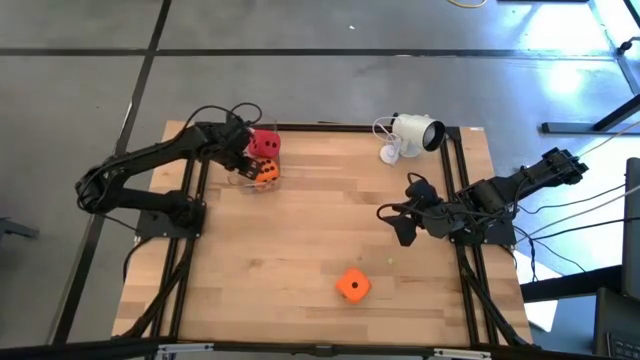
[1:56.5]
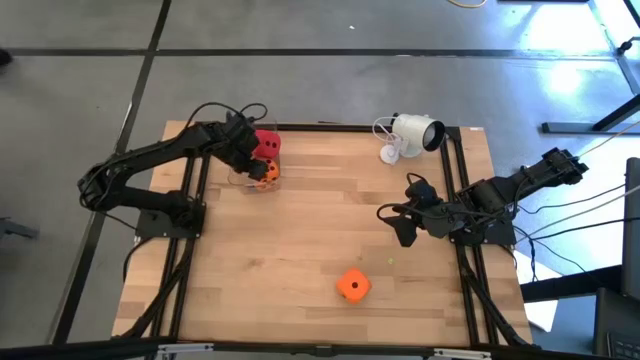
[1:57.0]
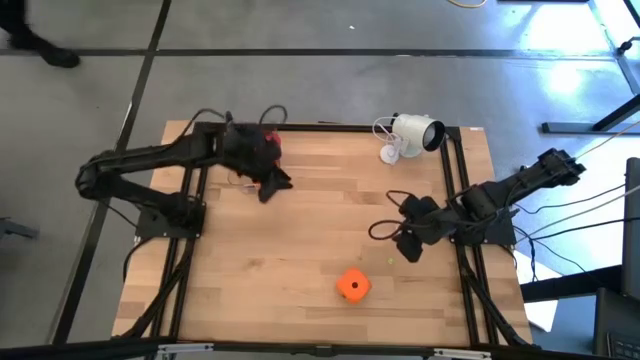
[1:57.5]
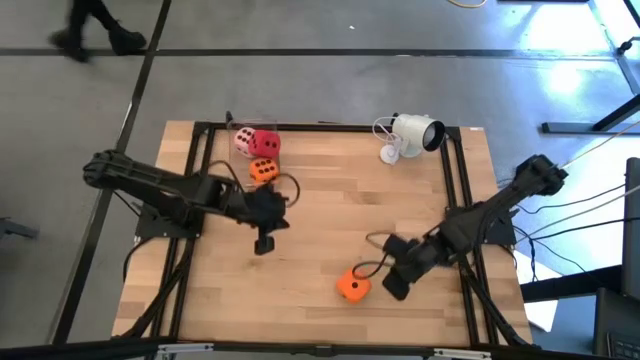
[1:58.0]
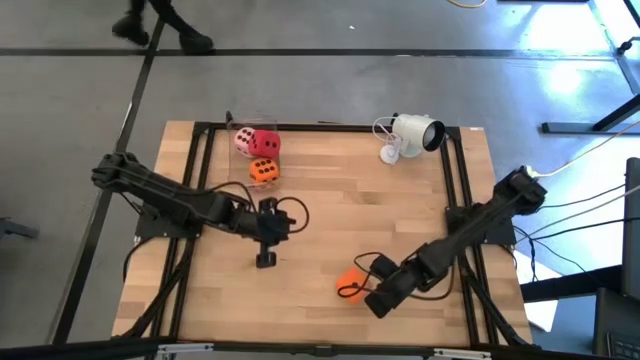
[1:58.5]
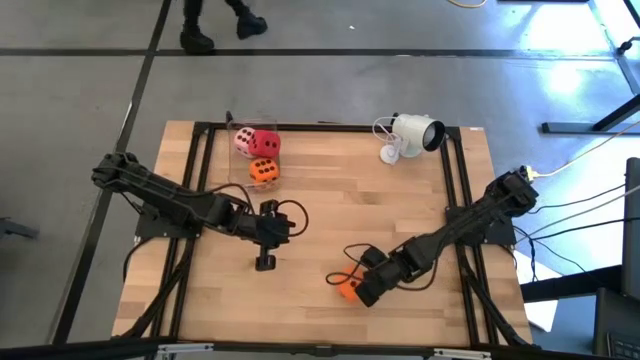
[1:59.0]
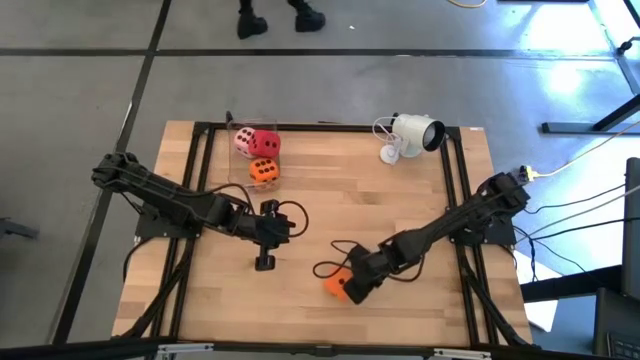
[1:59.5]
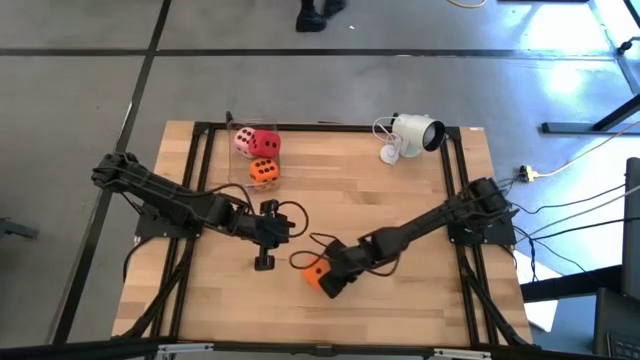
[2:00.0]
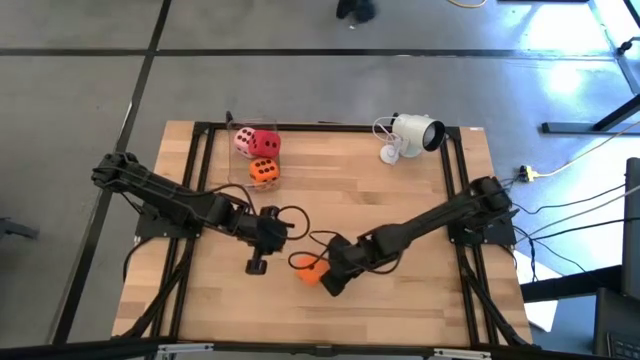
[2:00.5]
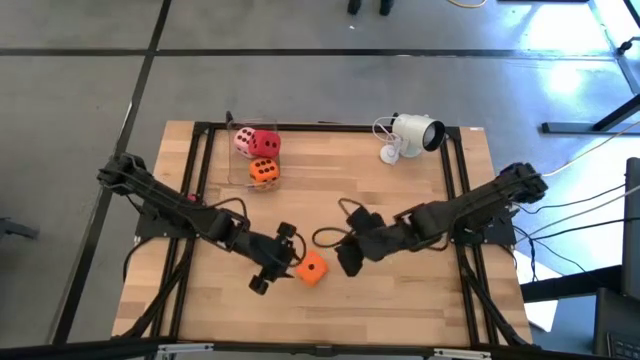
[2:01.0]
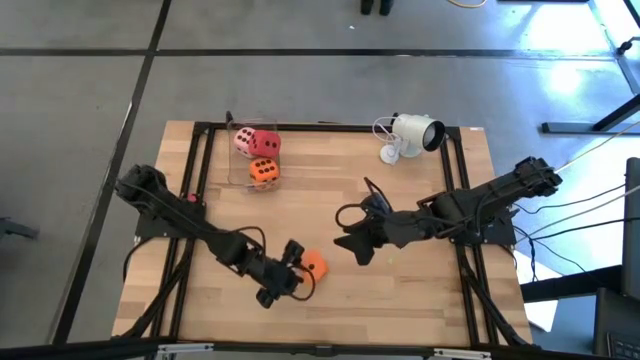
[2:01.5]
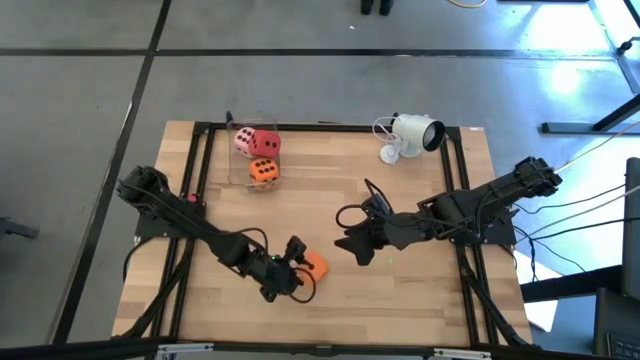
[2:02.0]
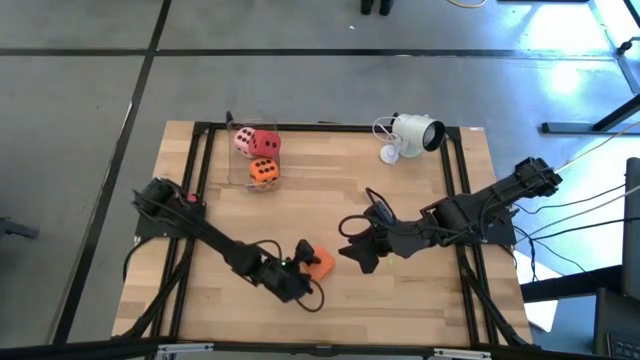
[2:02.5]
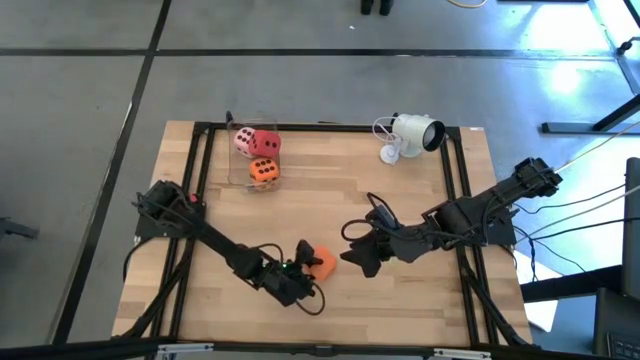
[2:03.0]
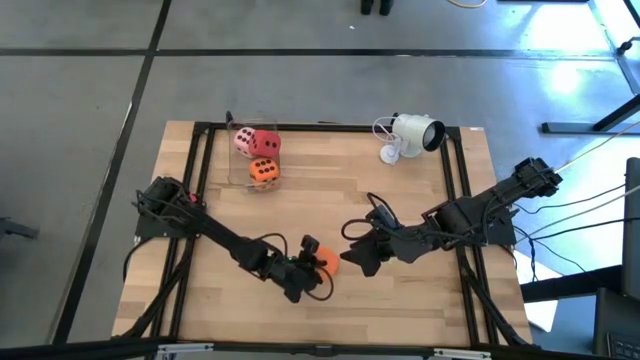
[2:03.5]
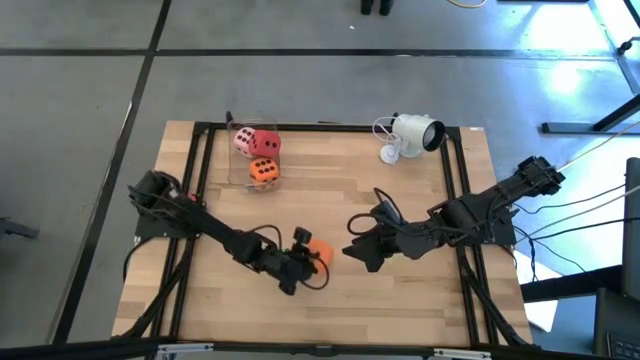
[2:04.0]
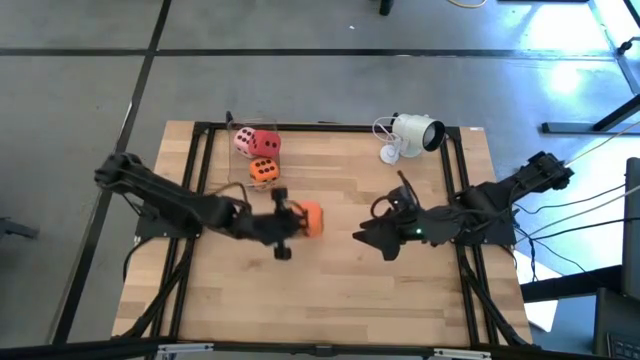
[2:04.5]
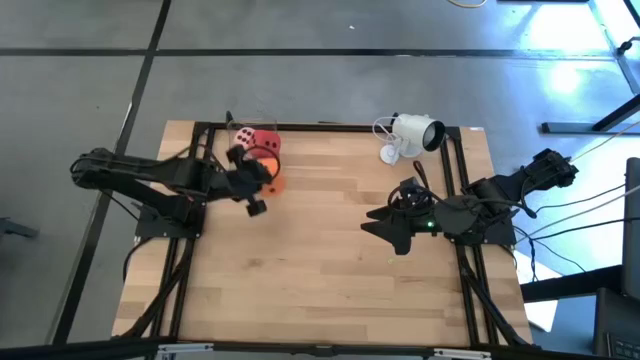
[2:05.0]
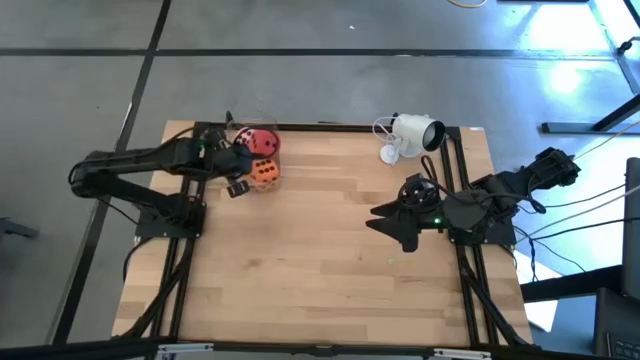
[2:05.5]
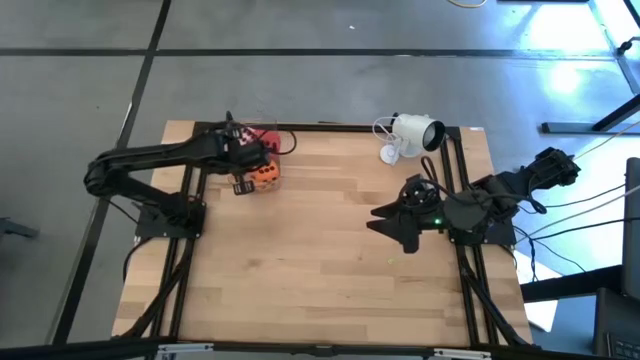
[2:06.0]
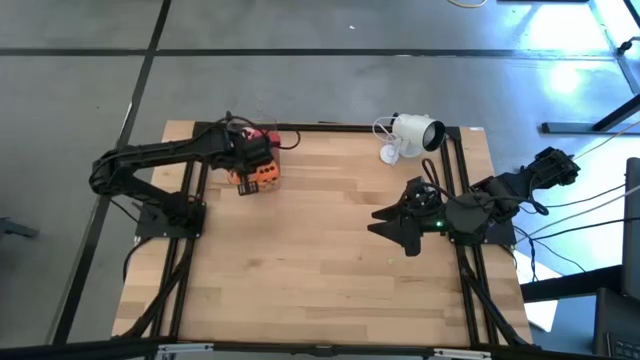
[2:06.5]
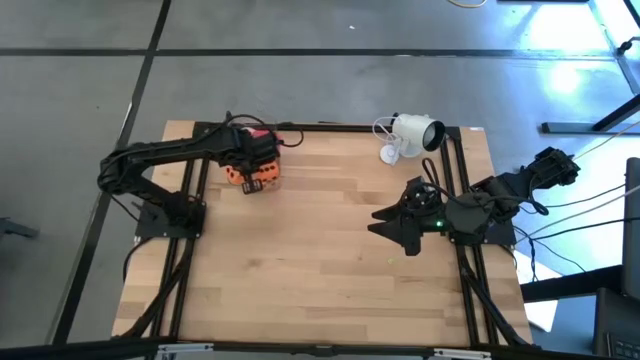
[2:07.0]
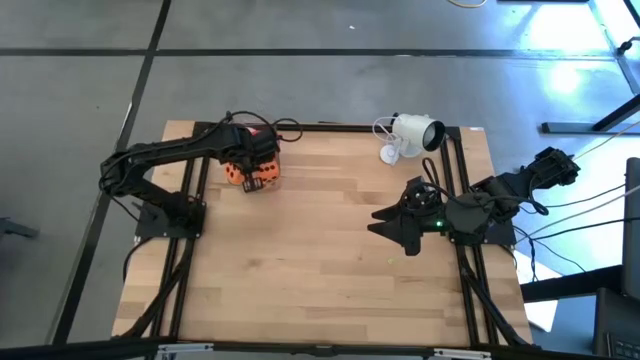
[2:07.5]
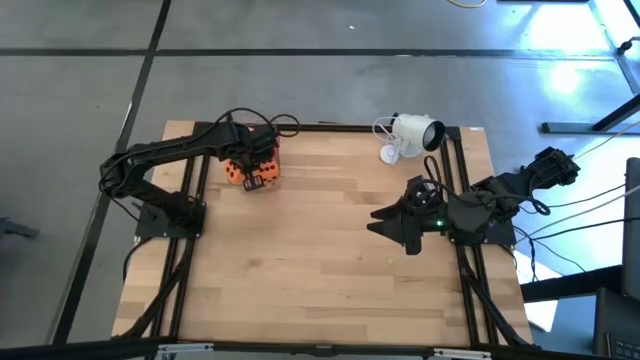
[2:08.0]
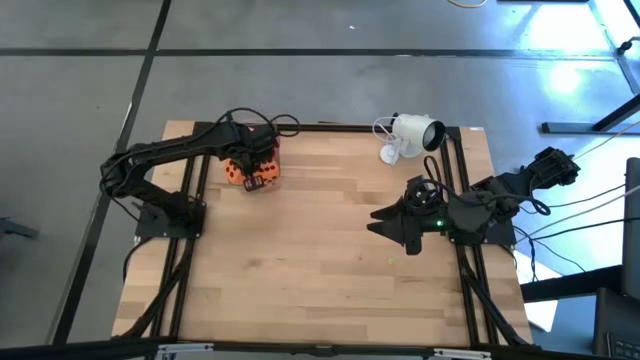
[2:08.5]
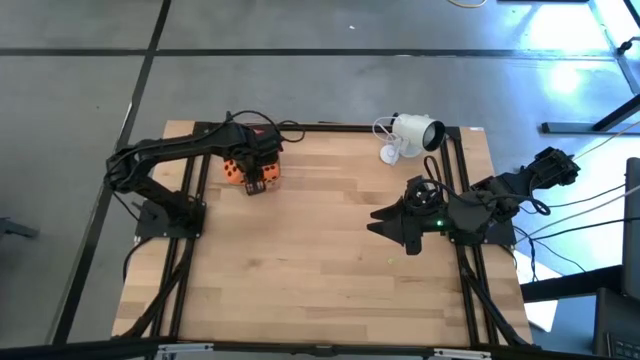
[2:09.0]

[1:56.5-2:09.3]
Task: Pick & Place Dice
Put the large orange dice into the transparent bin

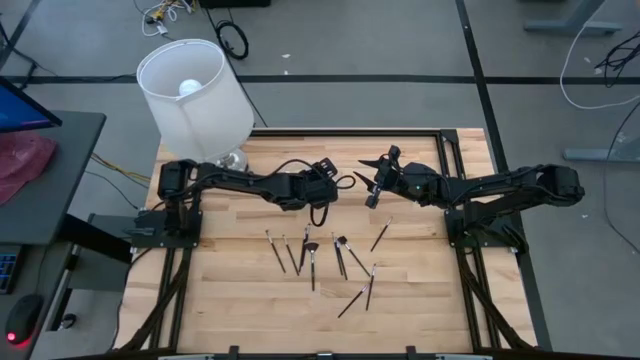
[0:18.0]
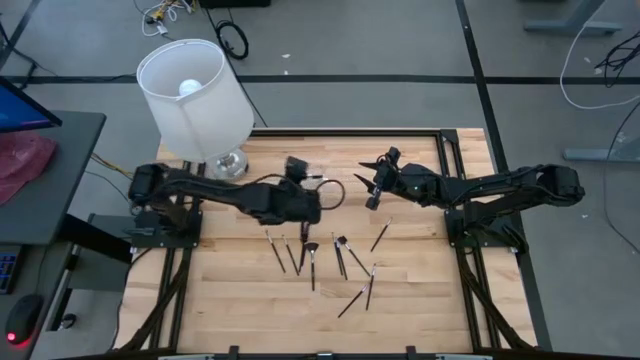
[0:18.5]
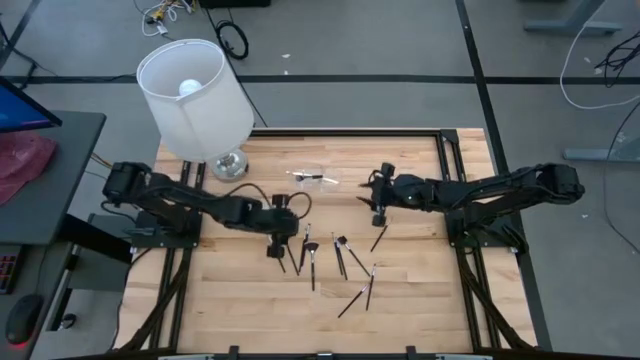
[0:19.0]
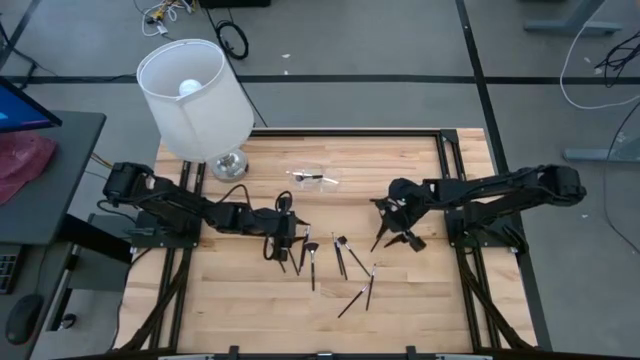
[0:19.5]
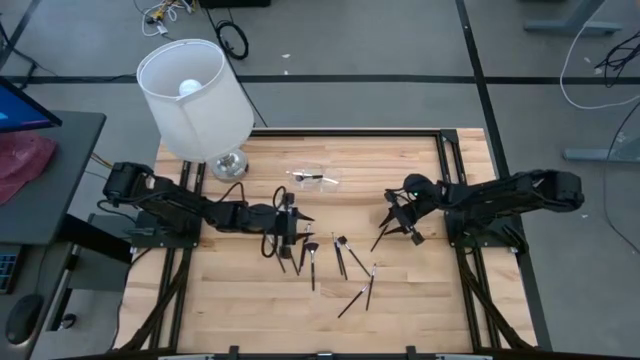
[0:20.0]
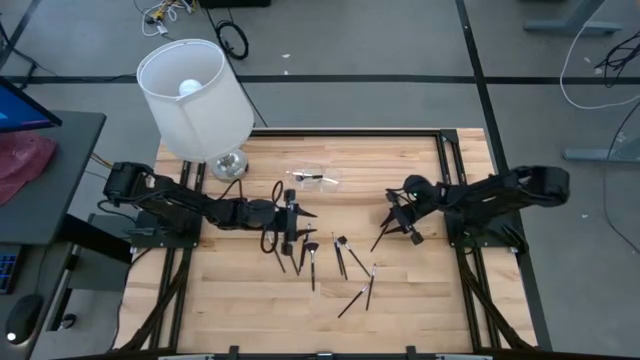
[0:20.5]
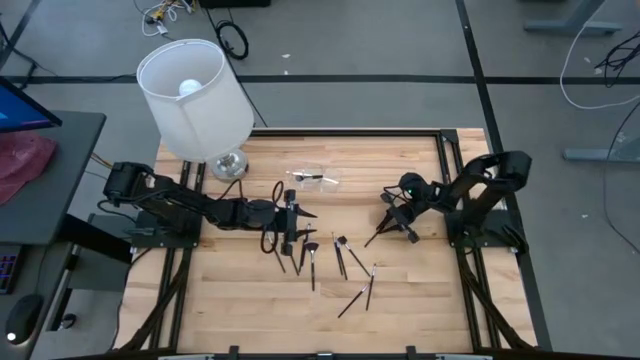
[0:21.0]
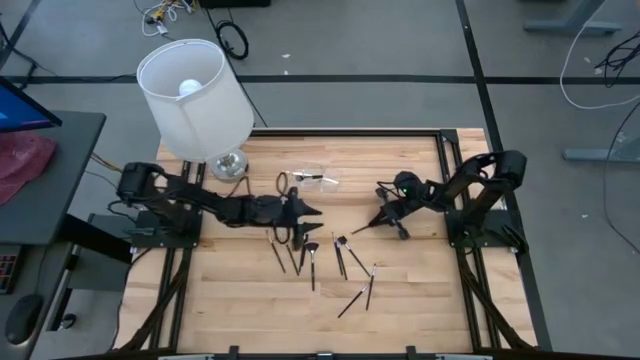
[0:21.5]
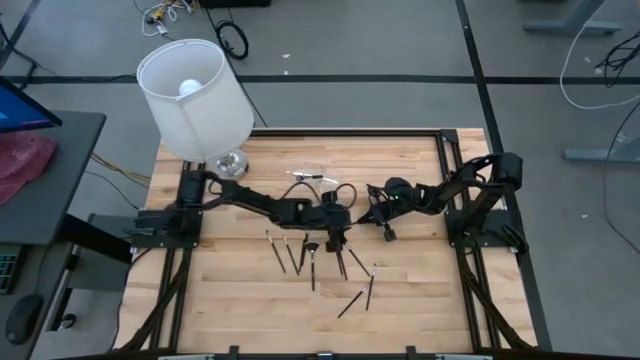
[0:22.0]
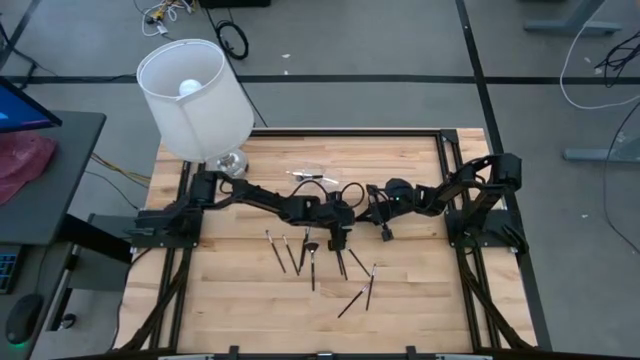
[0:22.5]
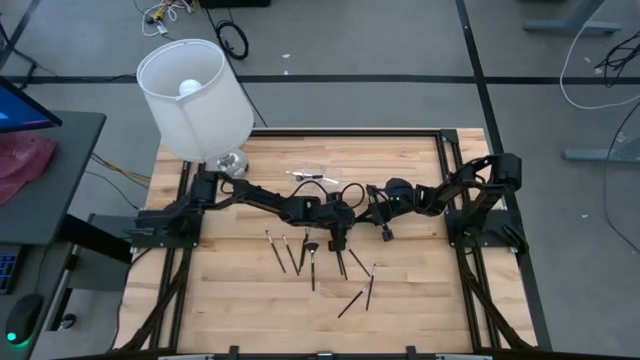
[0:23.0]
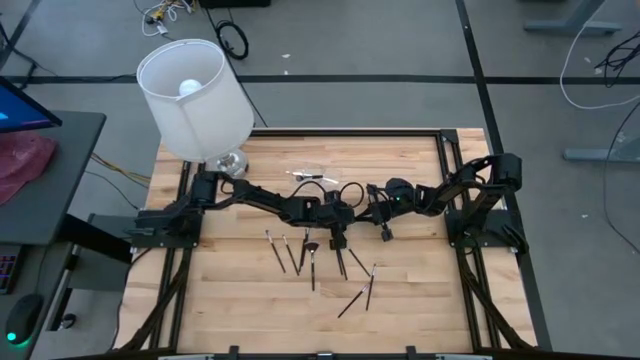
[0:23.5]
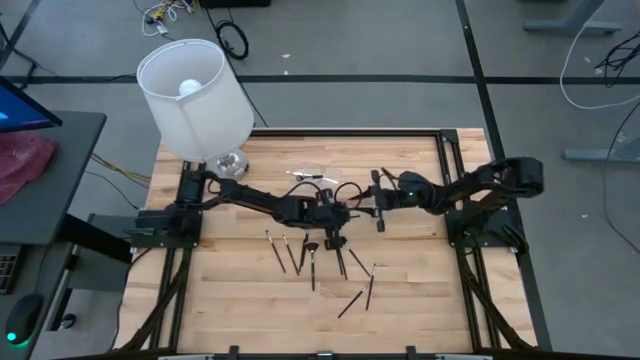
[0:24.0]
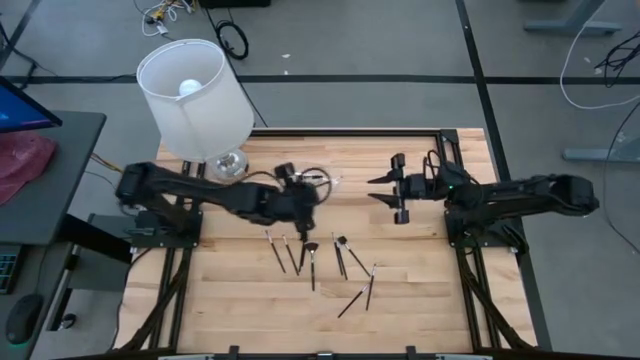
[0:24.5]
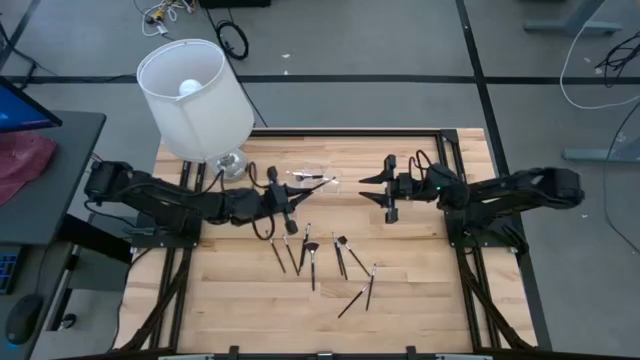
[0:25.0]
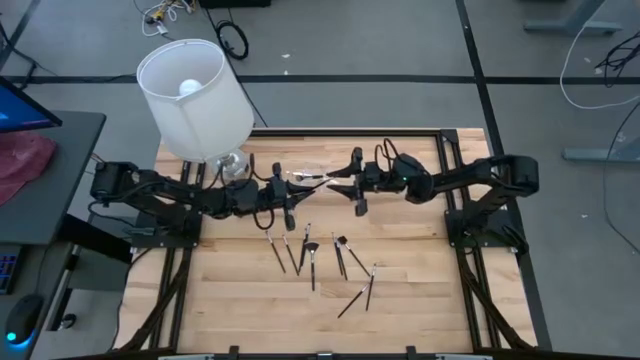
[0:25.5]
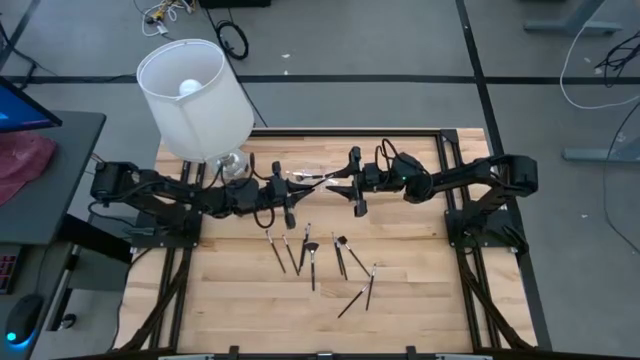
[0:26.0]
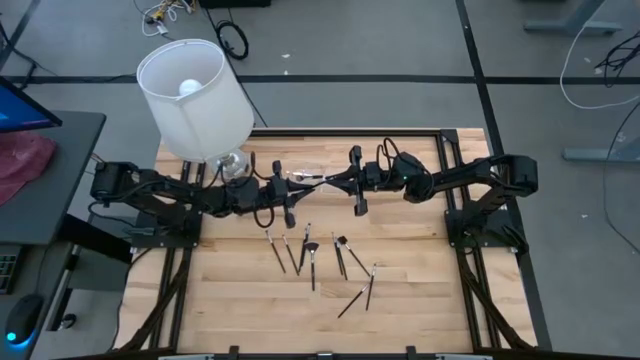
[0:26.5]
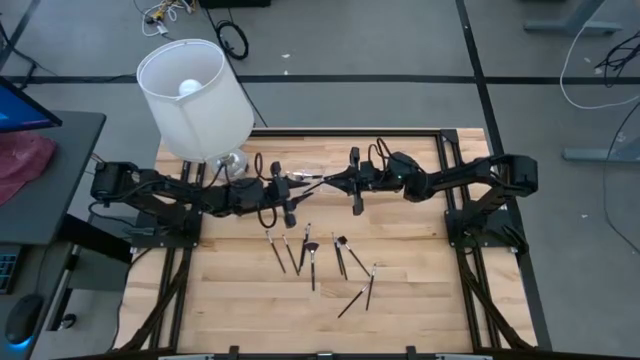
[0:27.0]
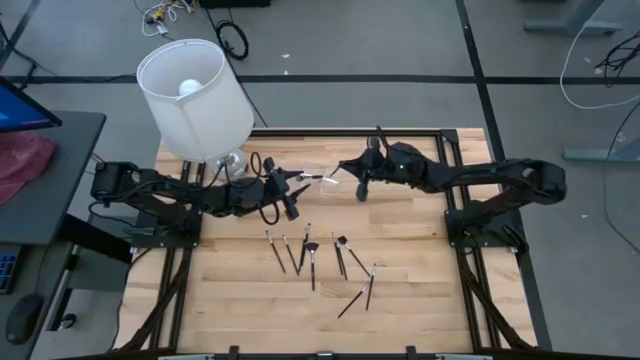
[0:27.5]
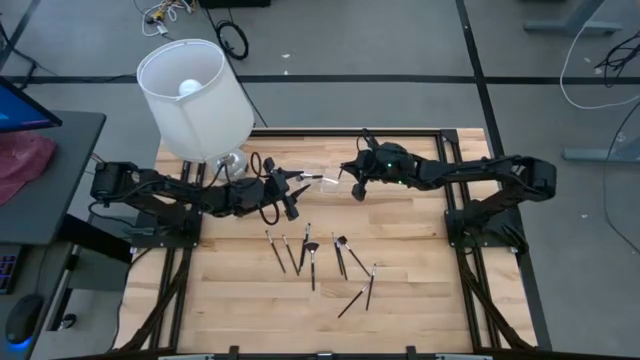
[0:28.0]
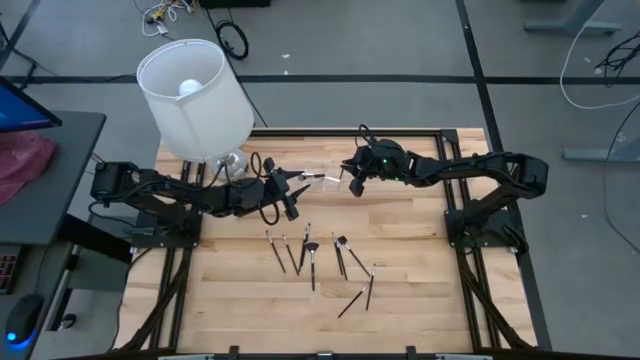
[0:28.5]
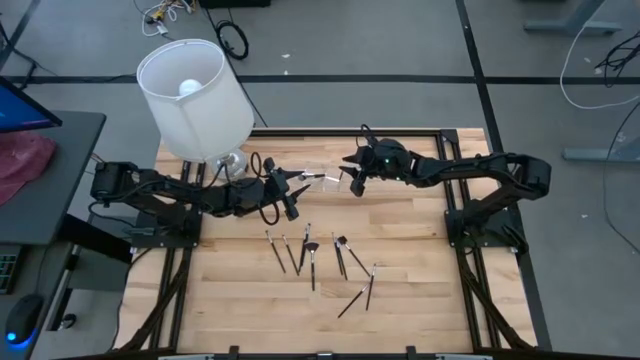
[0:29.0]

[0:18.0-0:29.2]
Task: Put items in baskets/containers
Put the black eyeshadow brush into the transparent organizer
